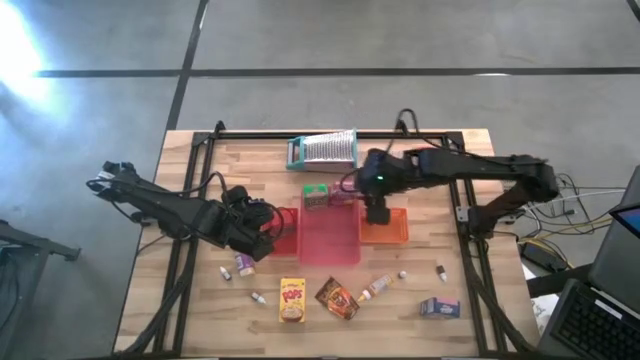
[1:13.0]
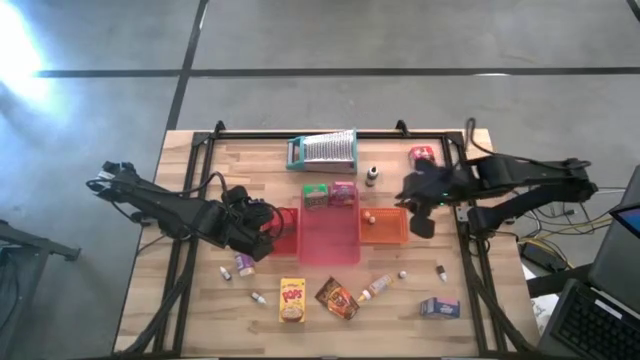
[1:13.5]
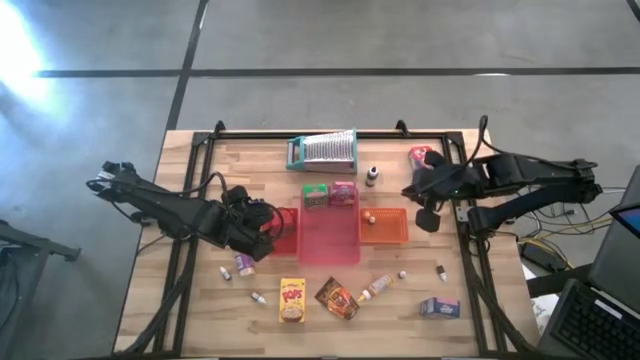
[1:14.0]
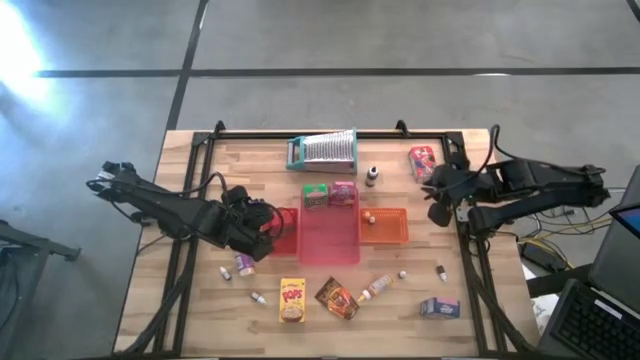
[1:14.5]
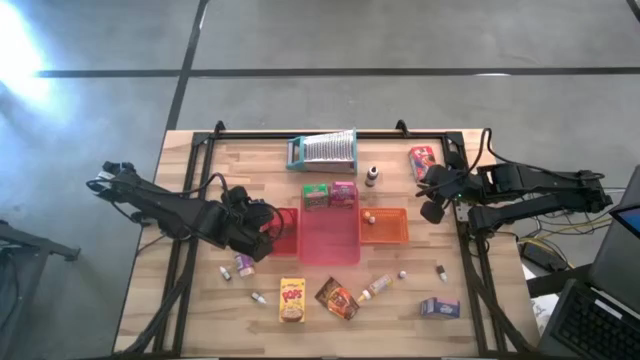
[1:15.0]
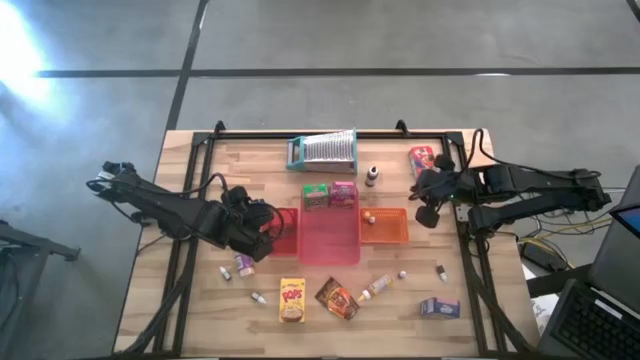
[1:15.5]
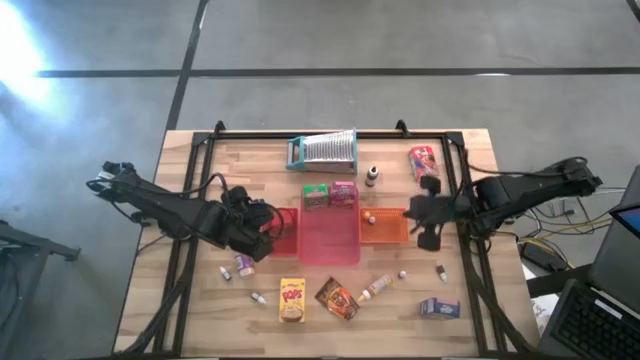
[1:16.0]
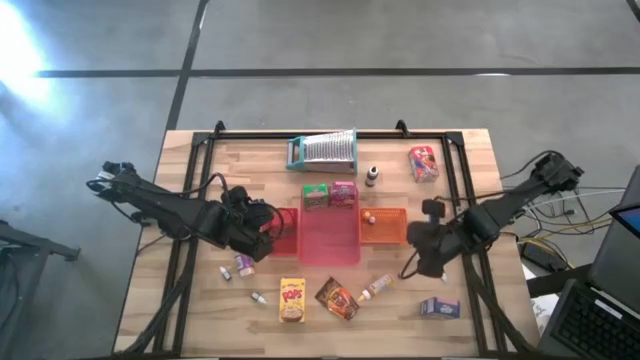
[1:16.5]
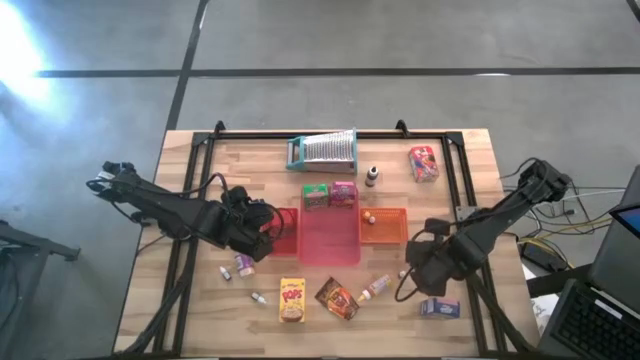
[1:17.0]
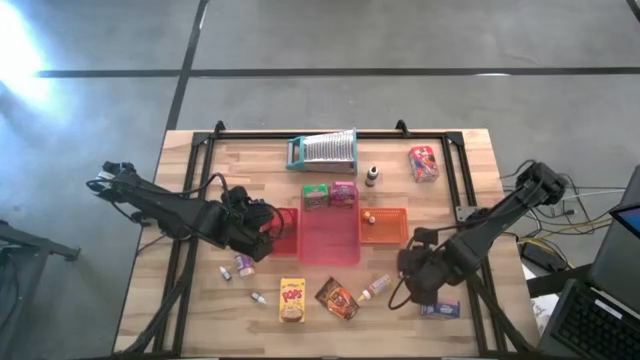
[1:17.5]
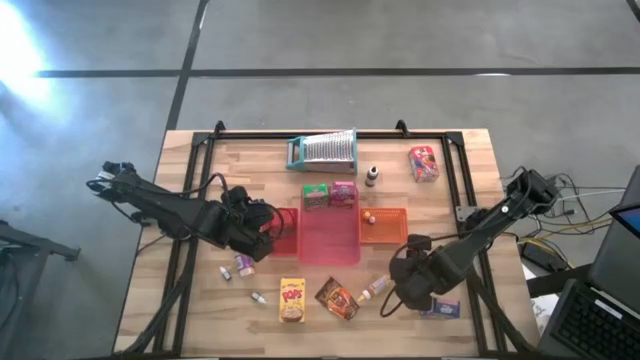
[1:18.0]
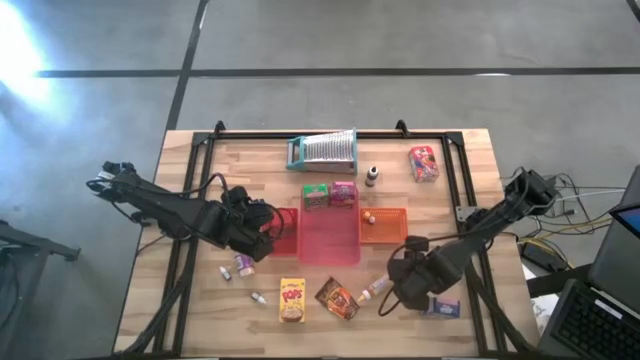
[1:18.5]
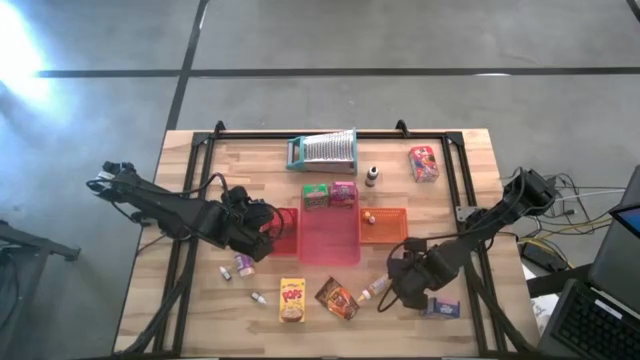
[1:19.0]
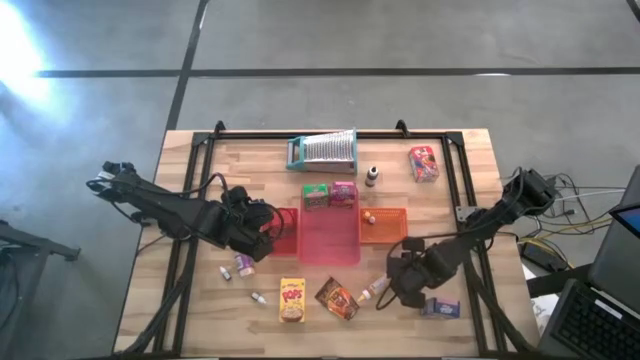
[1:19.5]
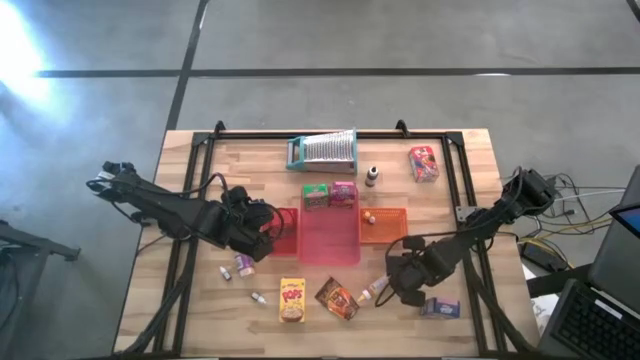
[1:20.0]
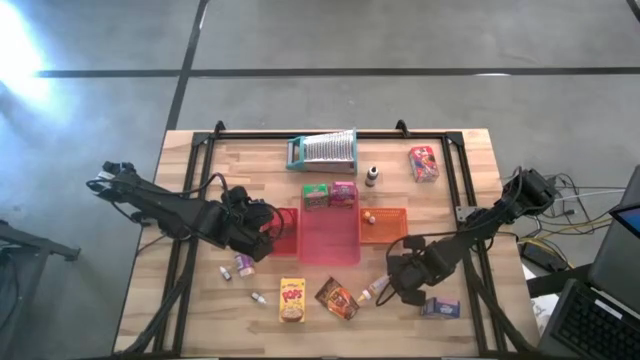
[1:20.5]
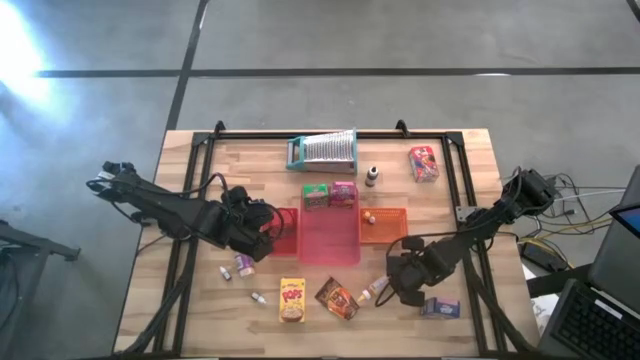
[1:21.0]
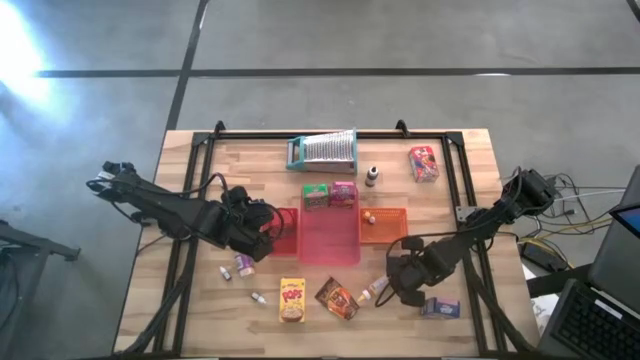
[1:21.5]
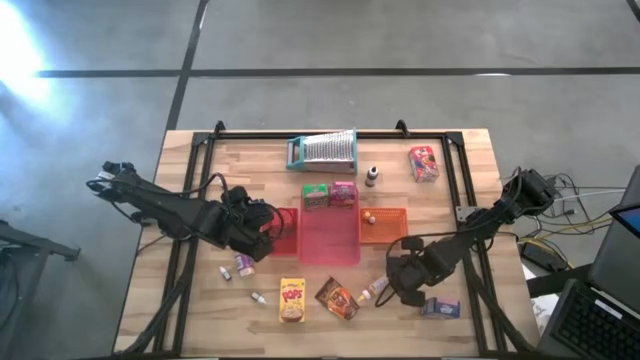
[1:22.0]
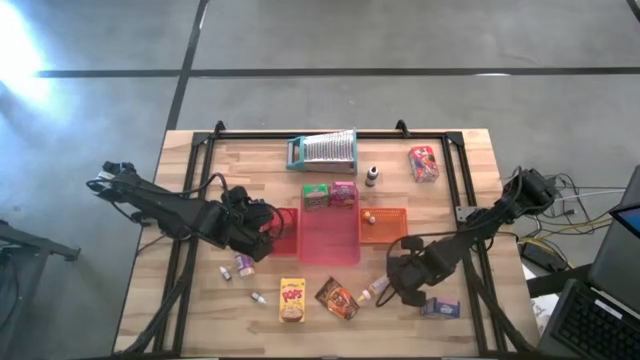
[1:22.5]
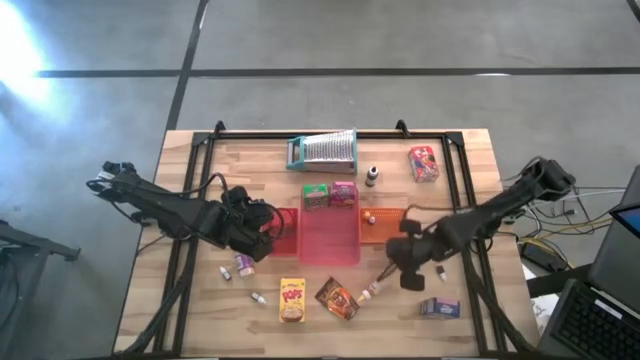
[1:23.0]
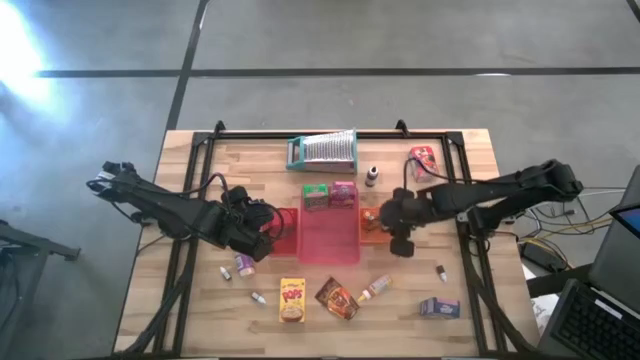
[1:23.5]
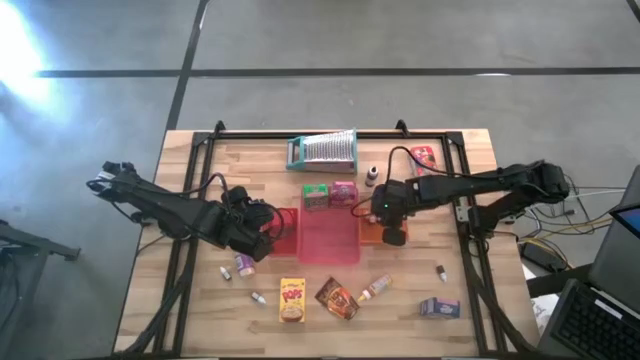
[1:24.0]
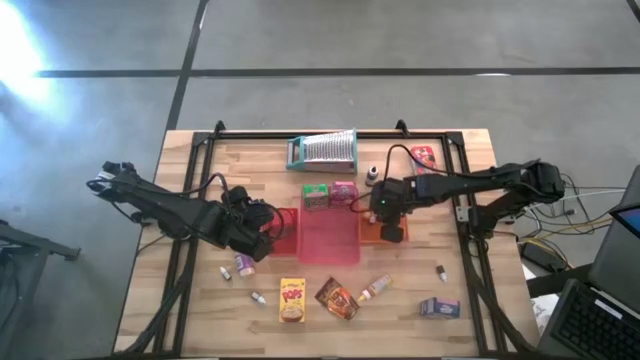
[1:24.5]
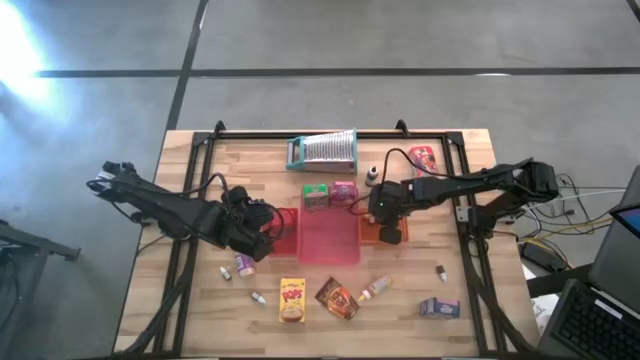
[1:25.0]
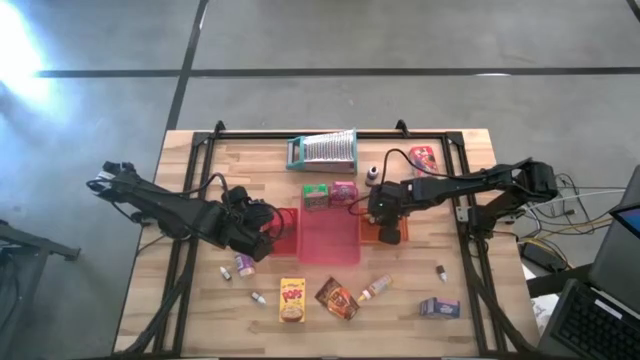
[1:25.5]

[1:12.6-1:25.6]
Task: Pick & Place Kitchen Items
Put the small black food coloring bottle into the orange bin

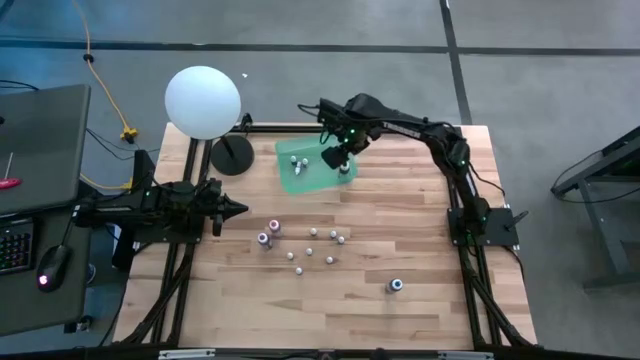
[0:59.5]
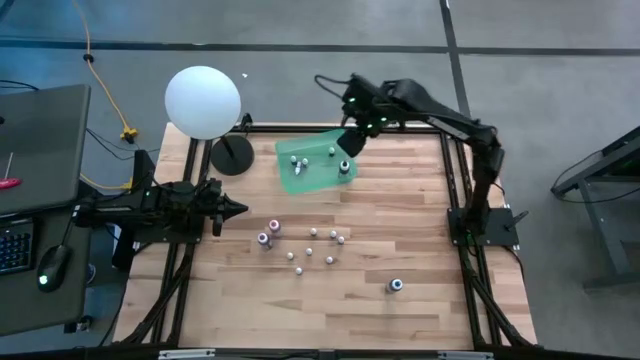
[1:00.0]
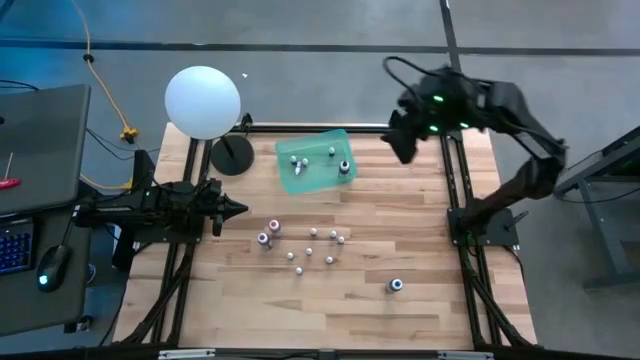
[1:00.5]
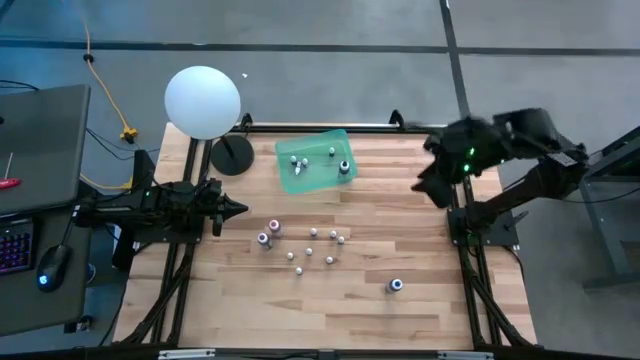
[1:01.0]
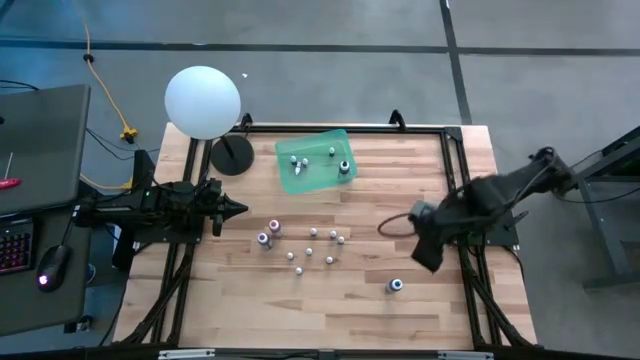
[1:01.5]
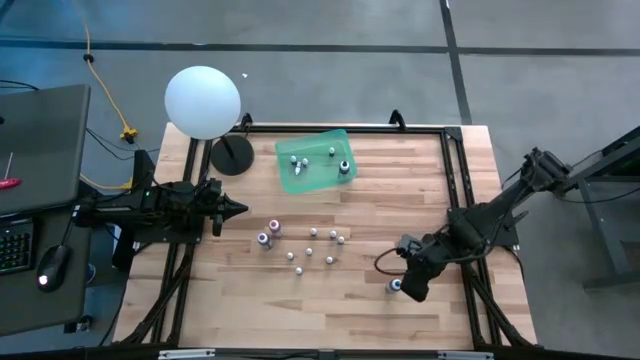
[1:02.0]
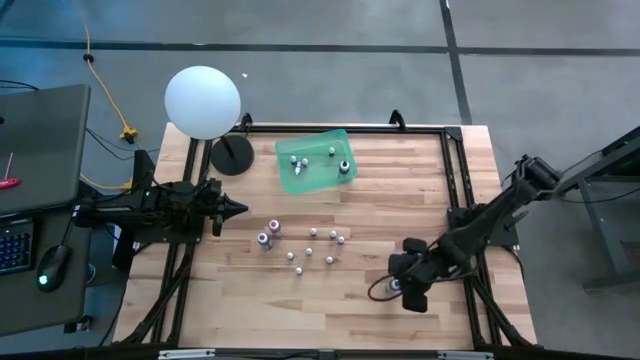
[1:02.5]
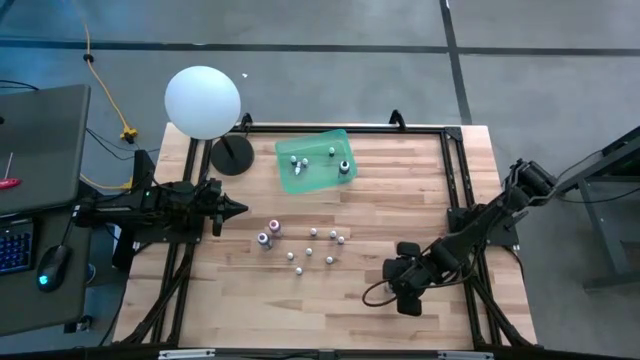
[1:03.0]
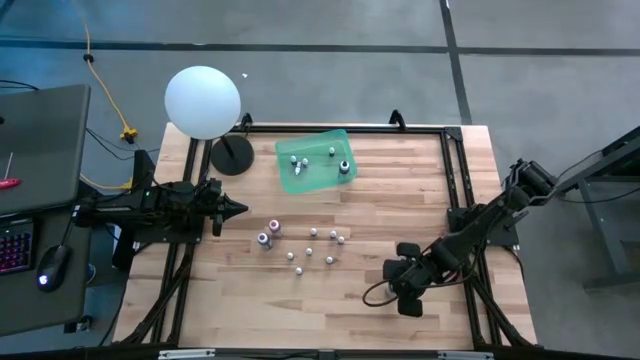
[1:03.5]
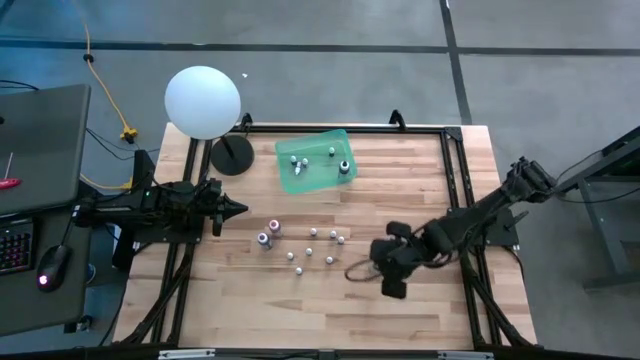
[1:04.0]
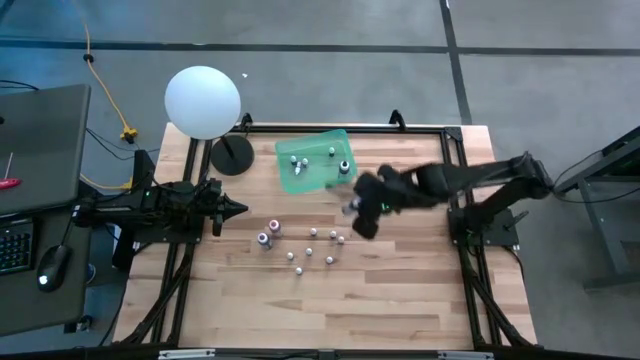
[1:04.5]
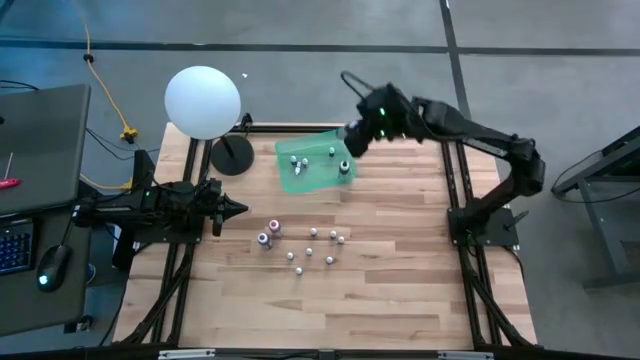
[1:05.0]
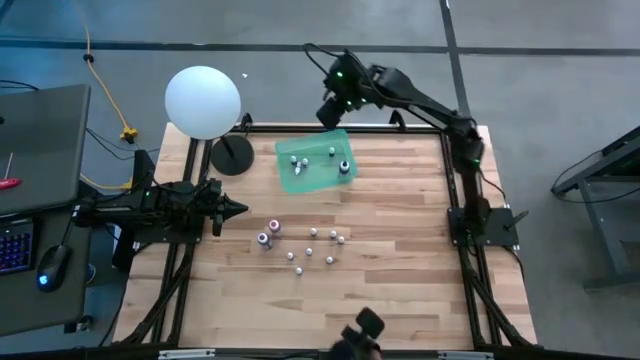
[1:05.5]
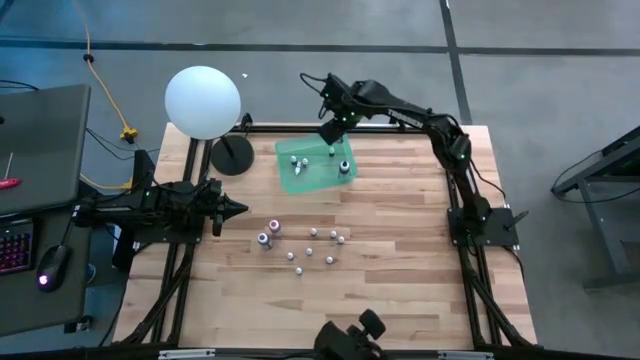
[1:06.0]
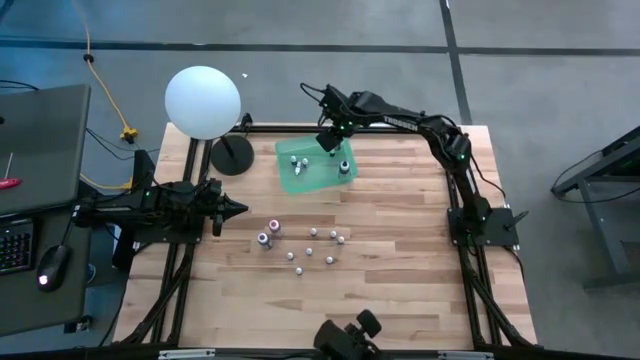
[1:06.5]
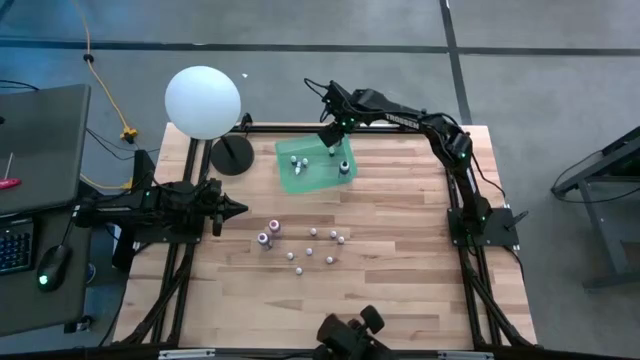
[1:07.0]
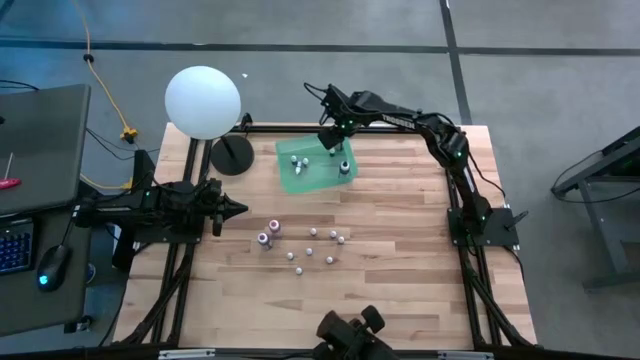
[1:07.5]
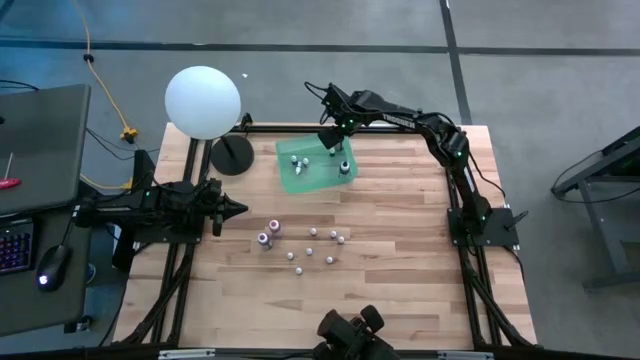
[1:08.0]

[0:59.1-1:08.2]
Task: Pick & Place food coloring
Put the large blue dye bottles in the green bin
